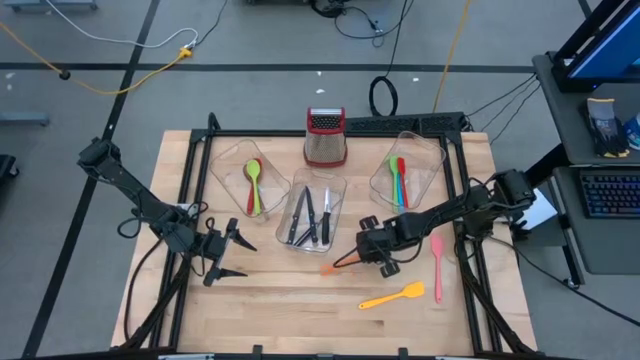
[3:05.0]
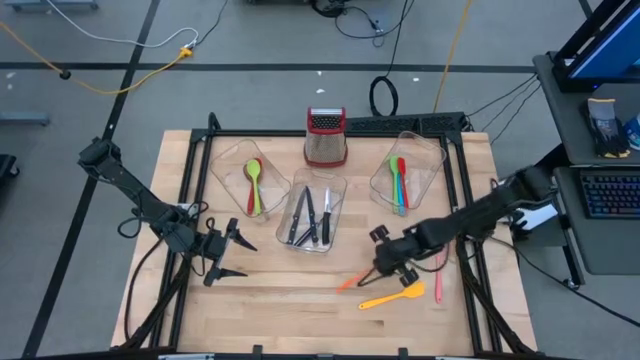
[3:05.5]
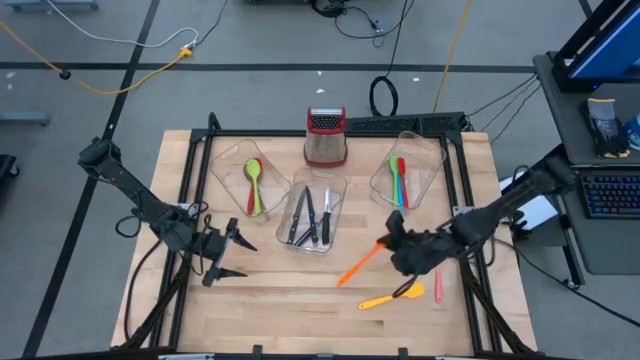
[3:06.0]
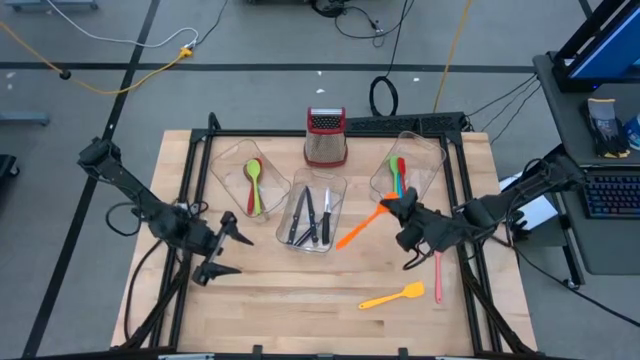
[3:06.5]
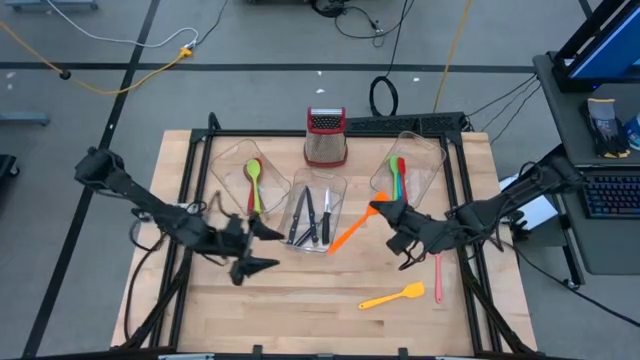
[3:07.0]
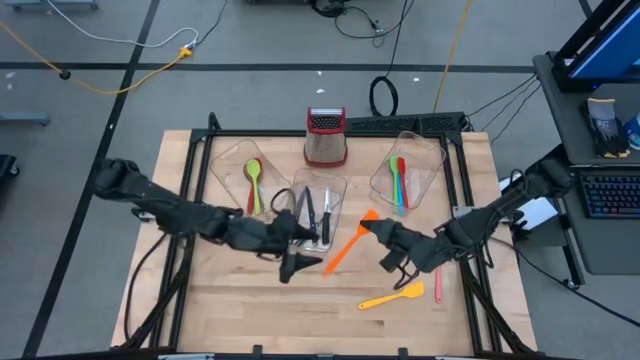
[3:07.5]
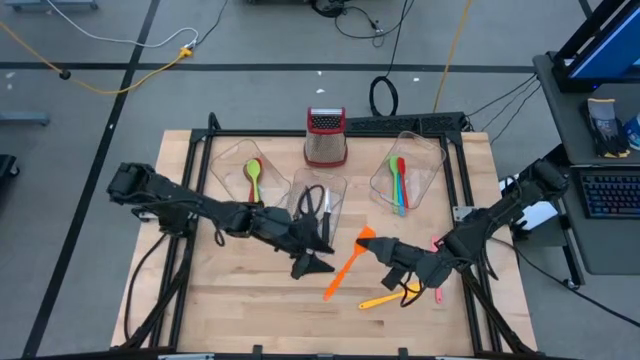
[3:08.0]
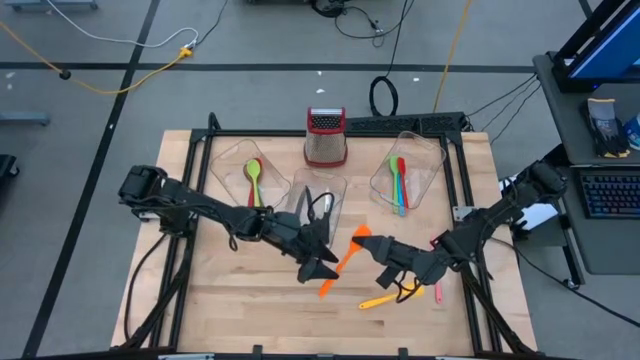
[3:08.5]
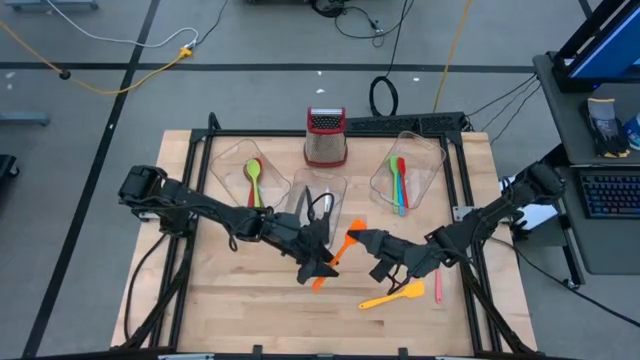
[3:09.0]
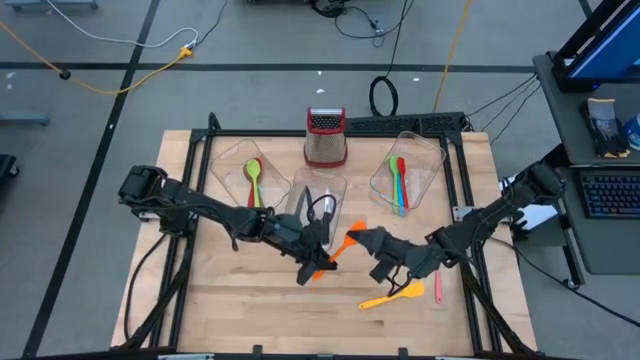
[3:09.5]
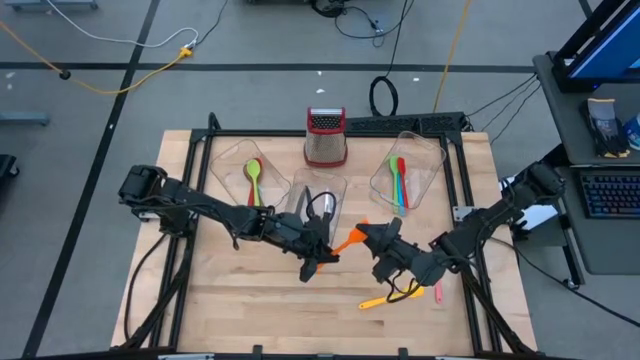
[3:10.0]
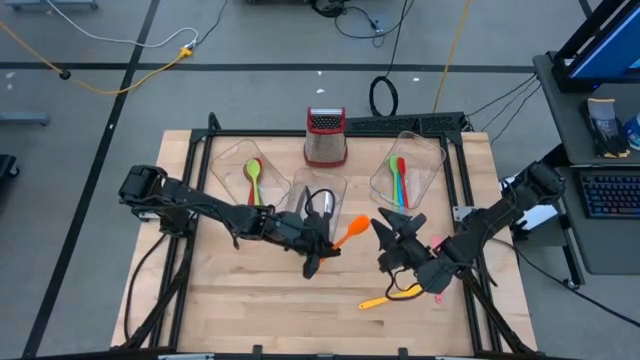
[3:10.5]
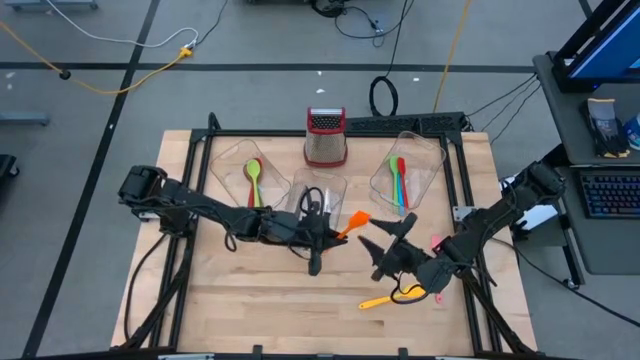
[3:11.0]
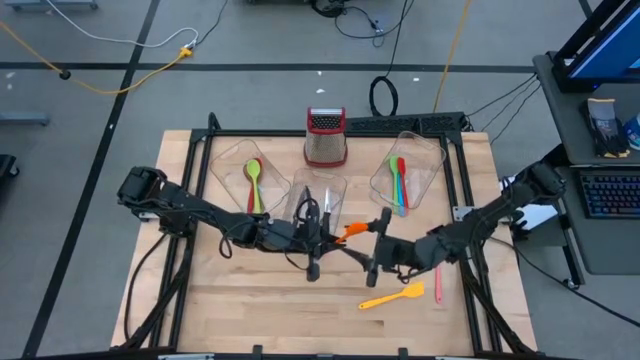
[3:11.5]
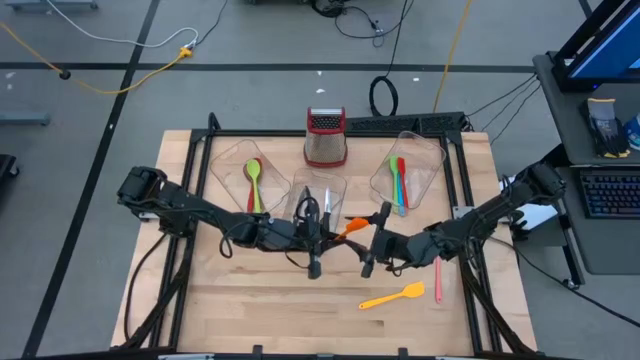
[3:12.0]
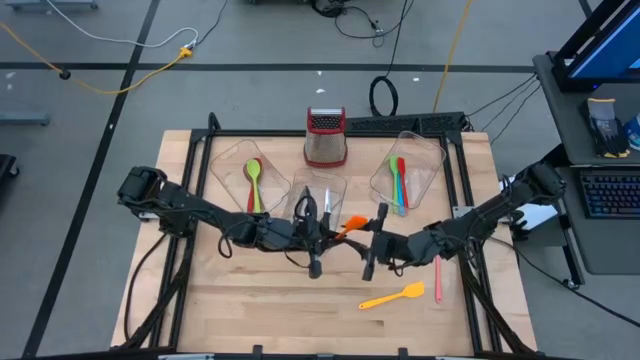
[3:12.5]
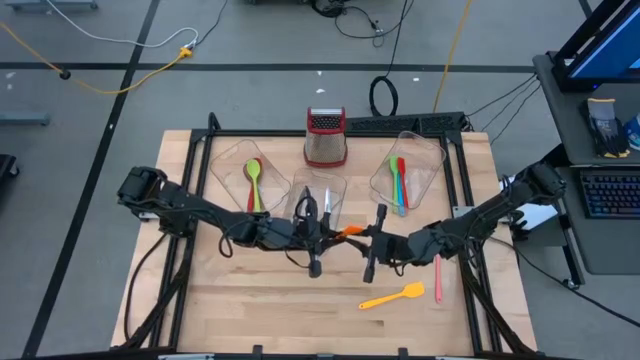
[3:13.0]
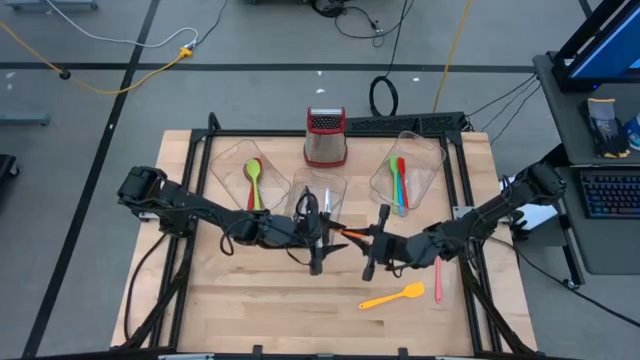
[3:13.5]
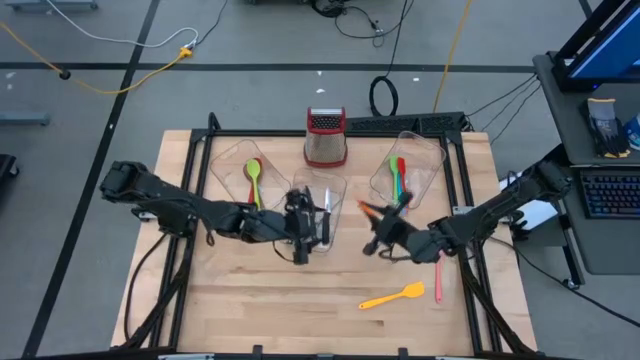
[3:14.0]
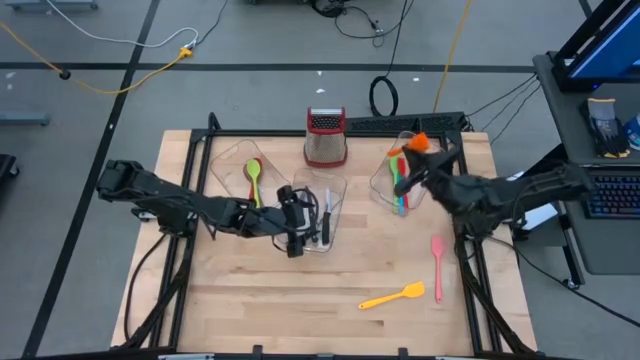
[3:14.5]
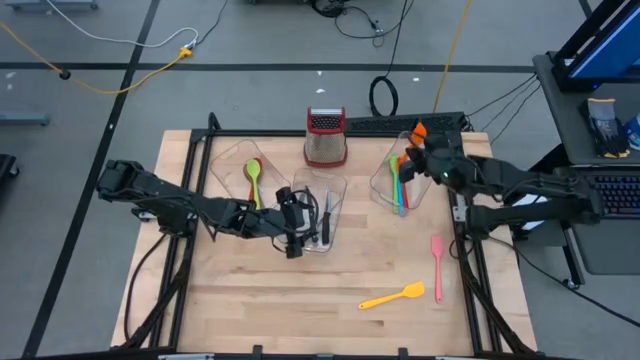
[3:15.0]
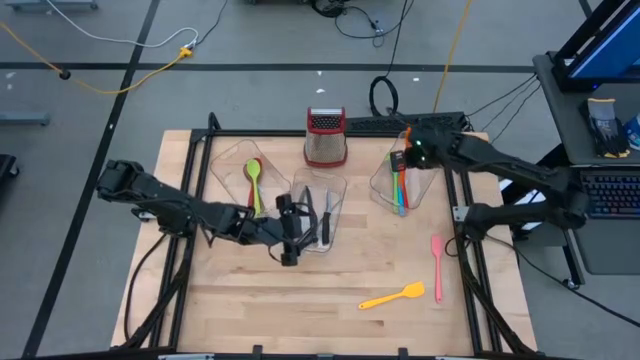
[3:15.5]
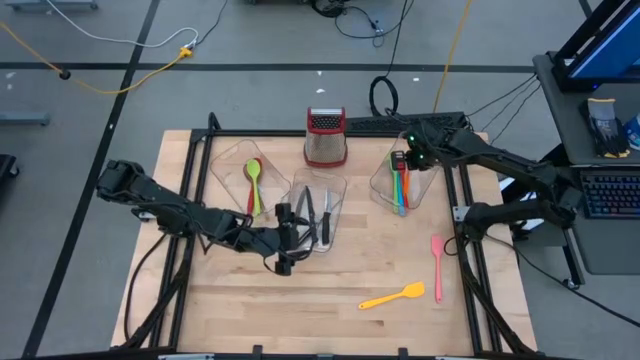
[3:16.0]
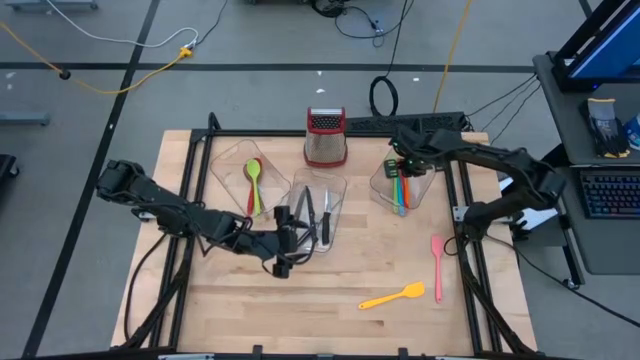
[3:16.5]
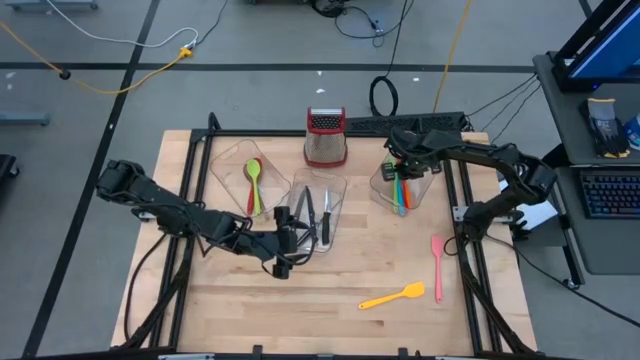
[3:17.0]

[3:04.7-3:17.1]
Task: Pick & Place Kitchen Items
Put the orange spatula on the right transparent bin

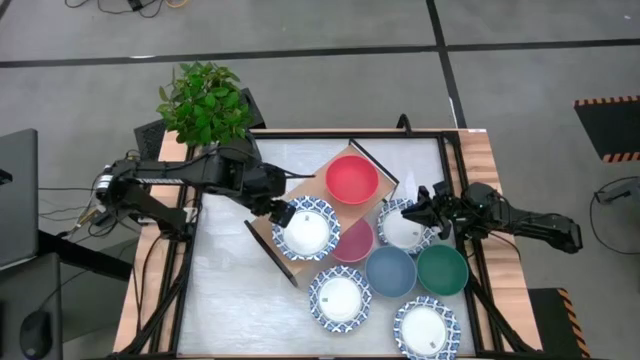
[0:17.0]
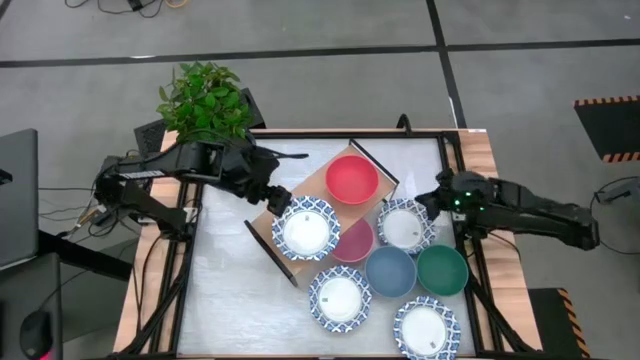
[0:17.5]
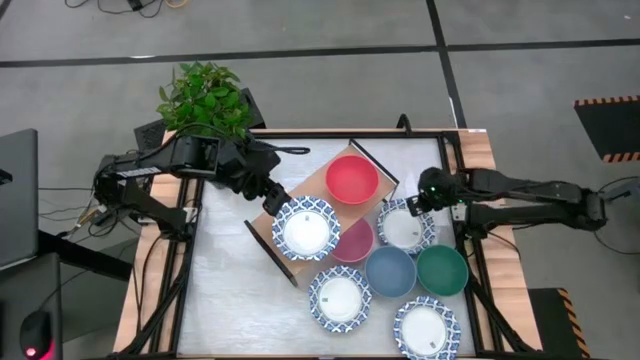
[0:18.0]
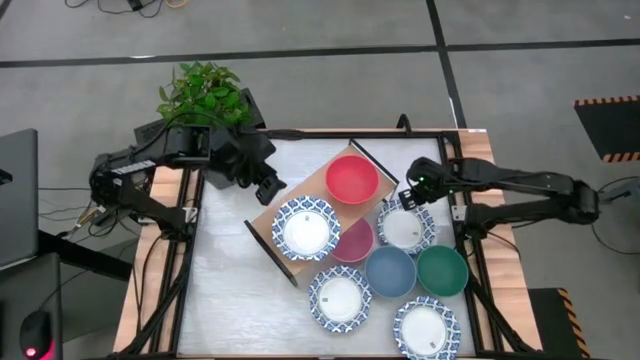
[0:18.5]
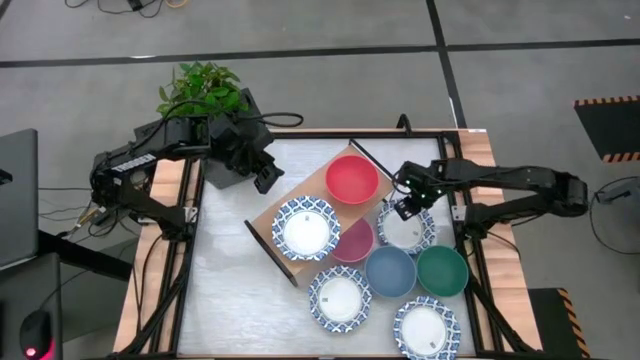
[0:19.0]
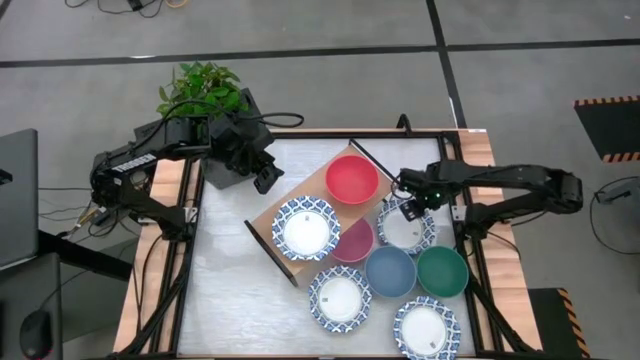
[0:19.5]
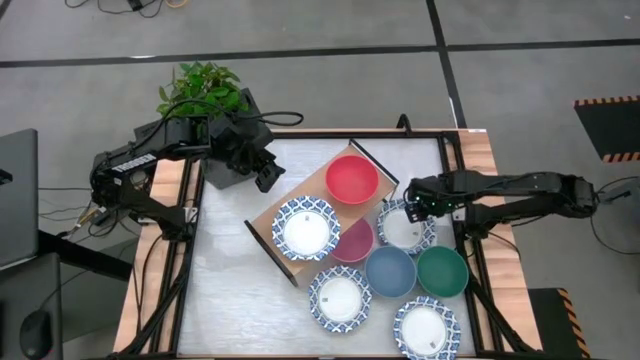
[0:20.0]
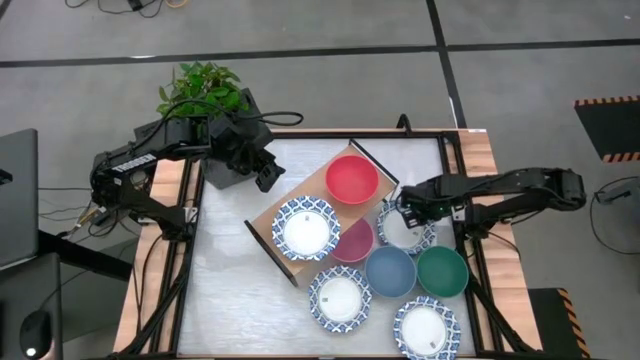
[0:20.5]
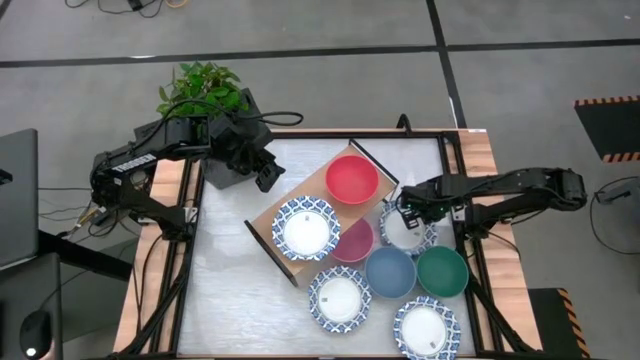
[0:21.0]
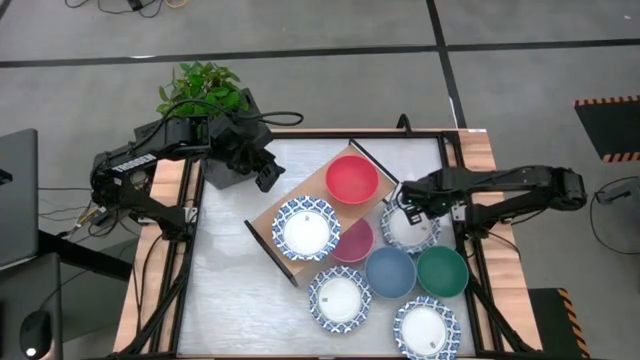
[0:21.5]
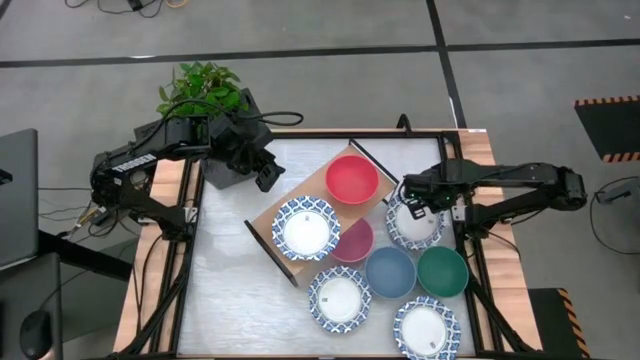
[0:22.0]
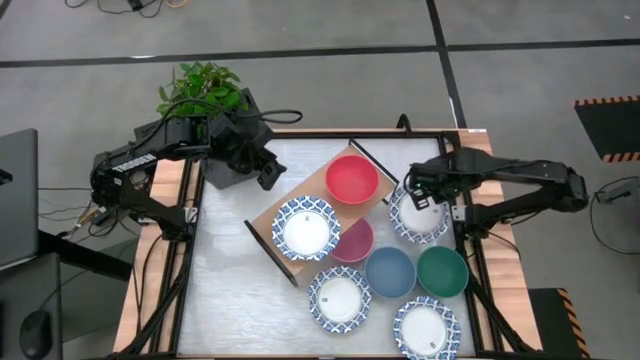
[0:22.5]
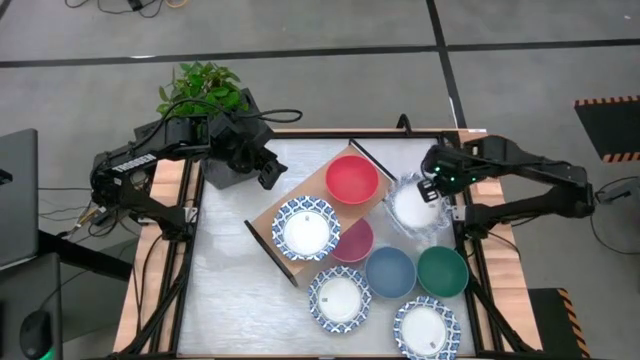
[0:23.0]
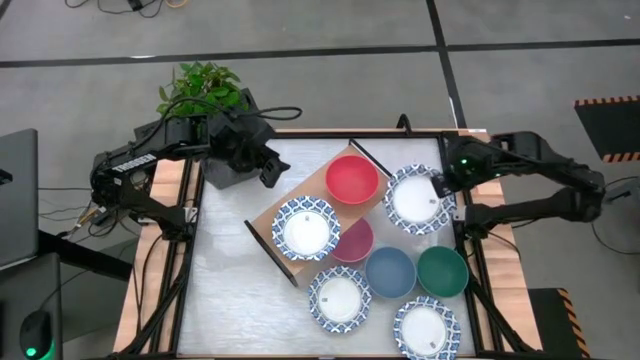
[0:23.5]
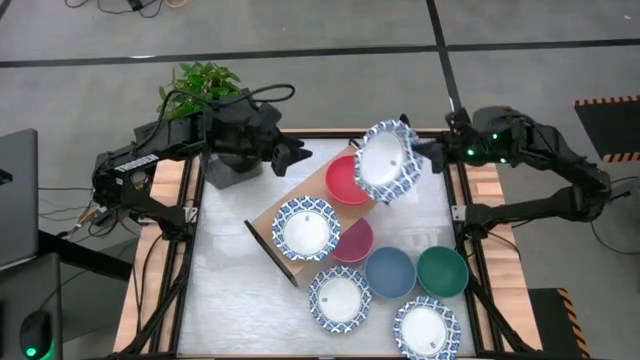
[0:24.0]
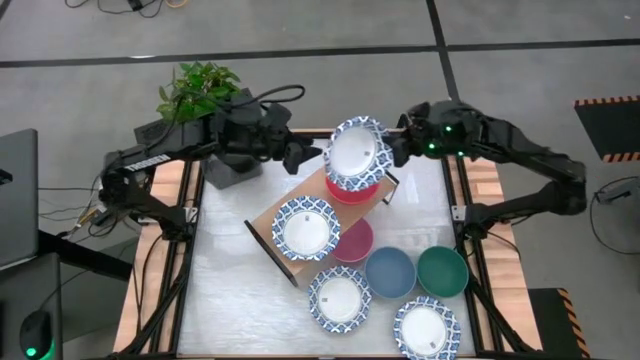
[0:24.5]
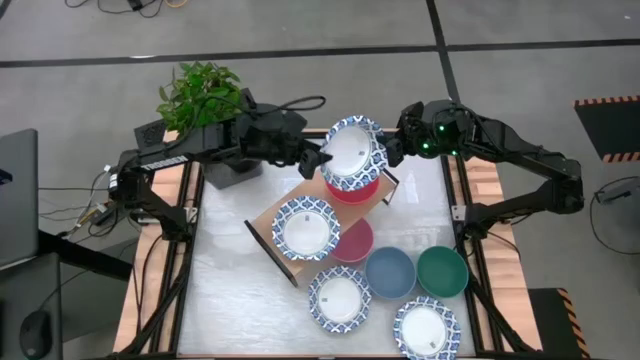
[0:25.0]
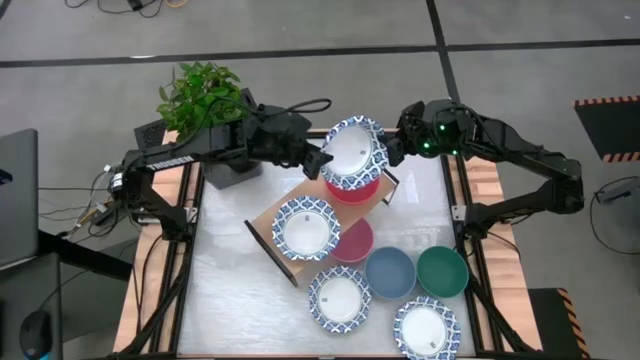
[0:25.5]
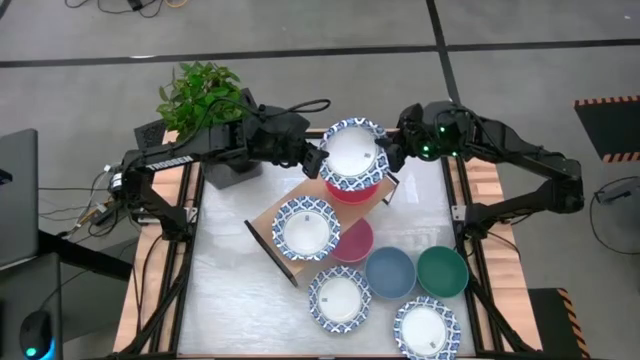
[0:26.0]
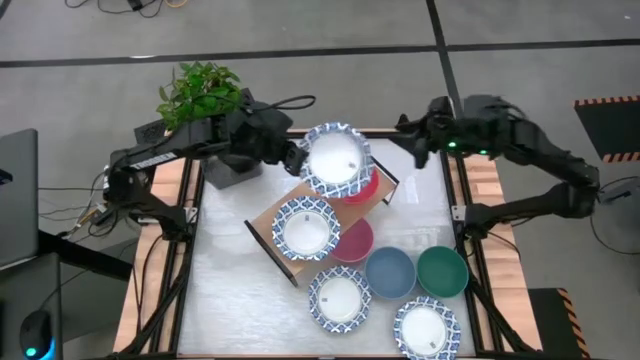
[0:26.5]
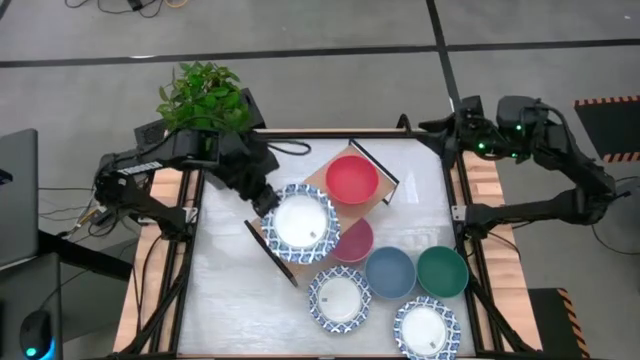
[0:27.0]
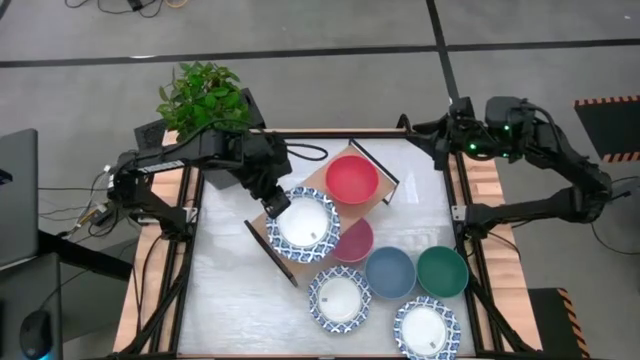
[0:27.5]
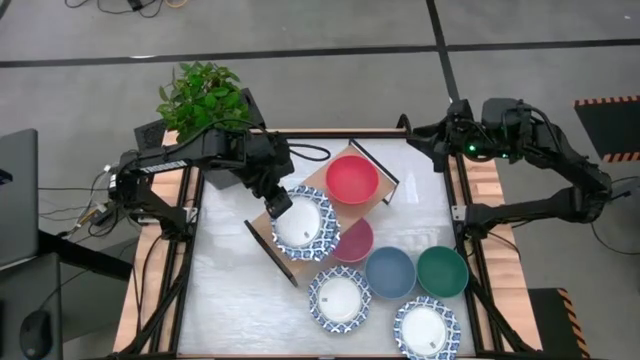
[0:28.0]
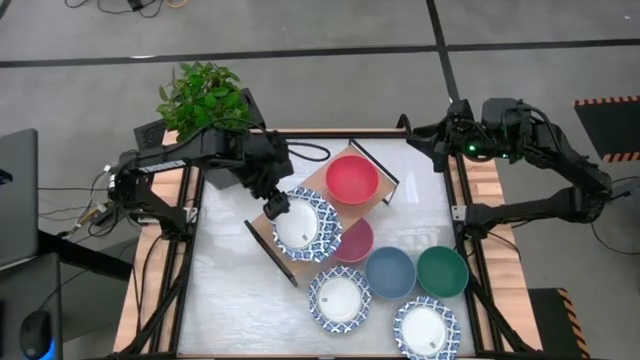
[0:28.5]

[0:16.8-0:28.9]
Task: Place and stack bowls onto a shelf
Stack the white patterned bowl on top of the white patterned bowl on the shelf
